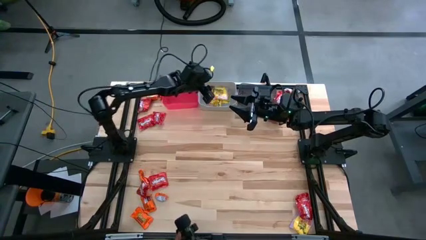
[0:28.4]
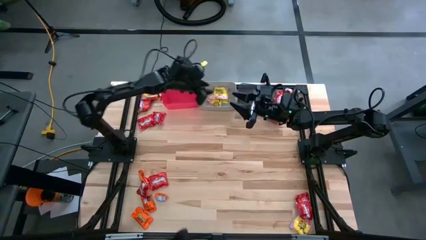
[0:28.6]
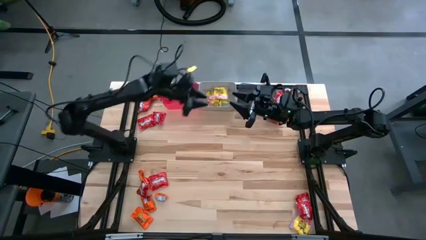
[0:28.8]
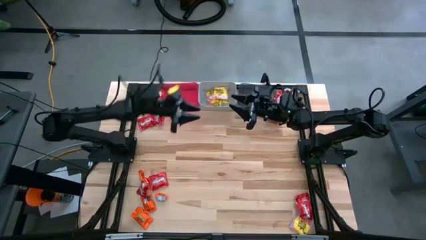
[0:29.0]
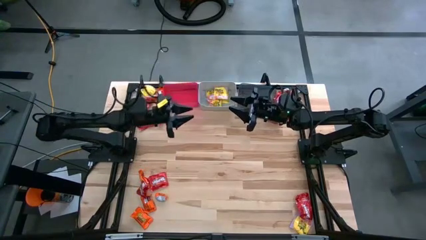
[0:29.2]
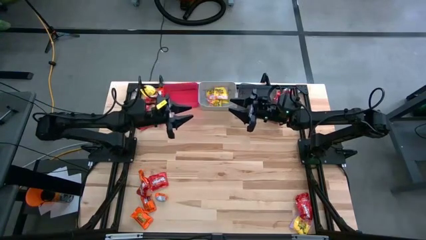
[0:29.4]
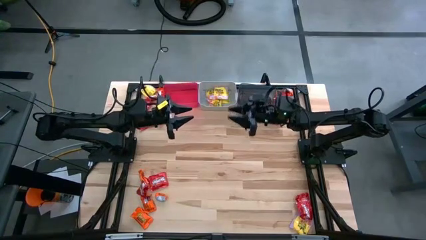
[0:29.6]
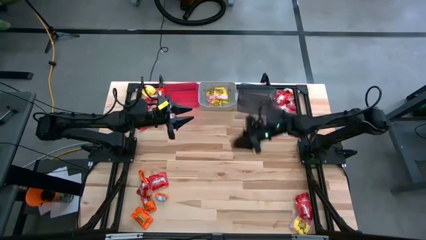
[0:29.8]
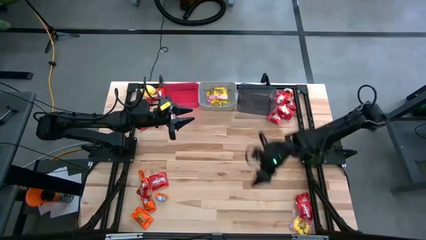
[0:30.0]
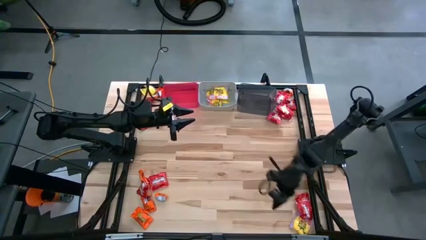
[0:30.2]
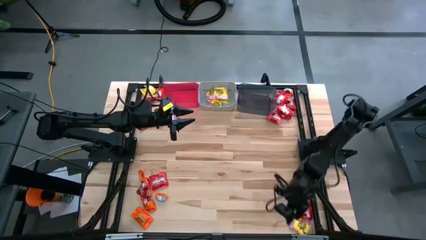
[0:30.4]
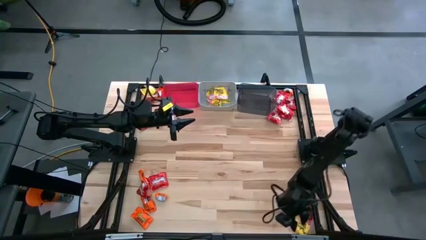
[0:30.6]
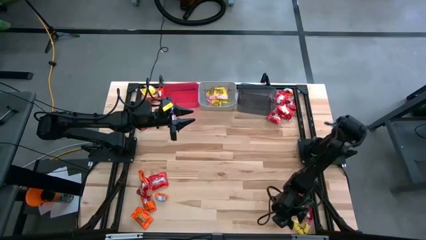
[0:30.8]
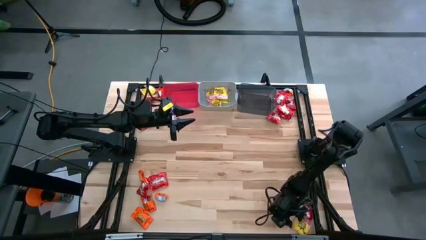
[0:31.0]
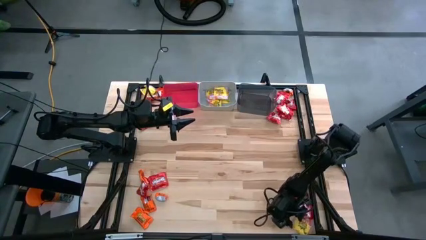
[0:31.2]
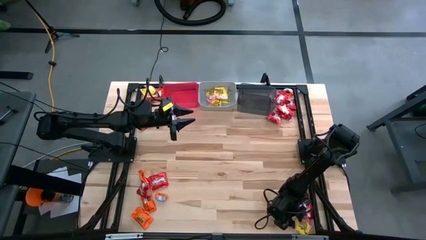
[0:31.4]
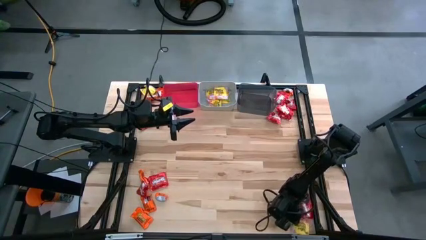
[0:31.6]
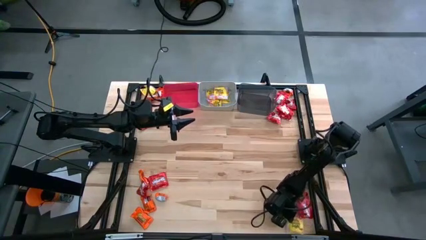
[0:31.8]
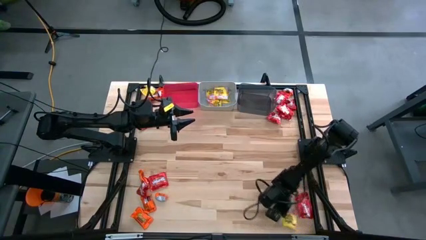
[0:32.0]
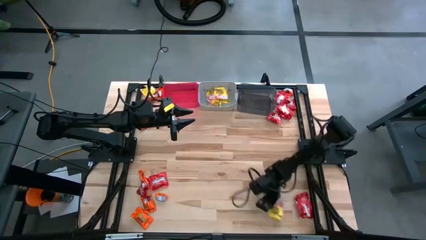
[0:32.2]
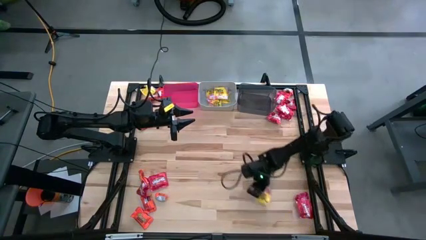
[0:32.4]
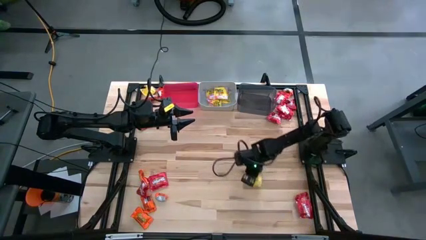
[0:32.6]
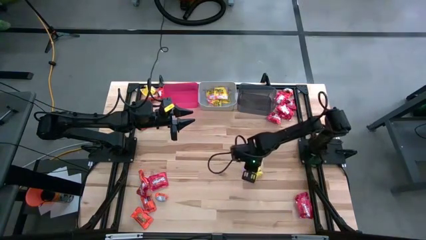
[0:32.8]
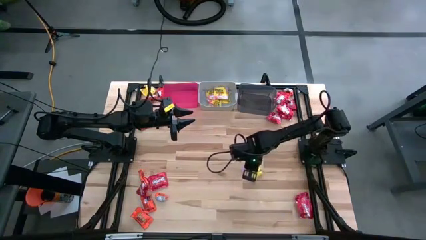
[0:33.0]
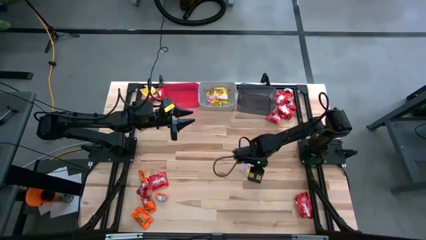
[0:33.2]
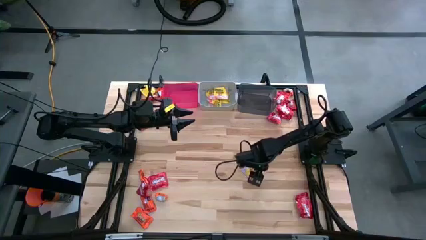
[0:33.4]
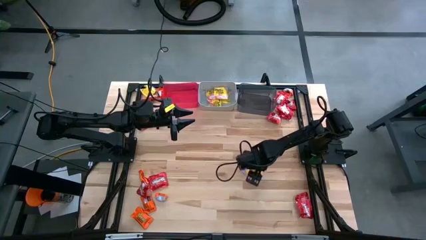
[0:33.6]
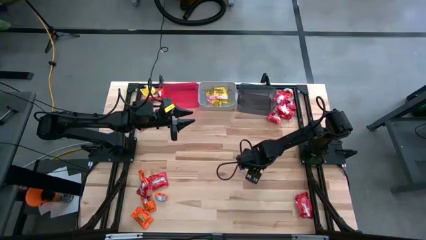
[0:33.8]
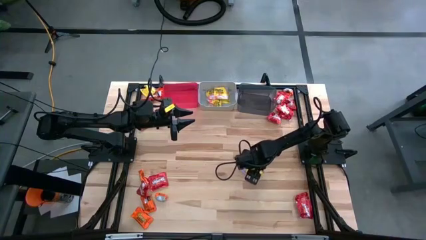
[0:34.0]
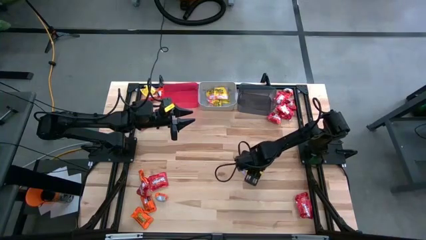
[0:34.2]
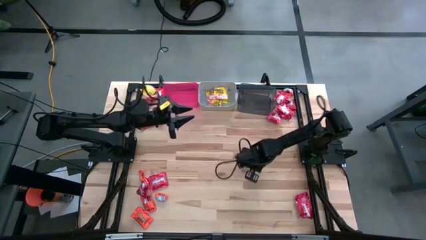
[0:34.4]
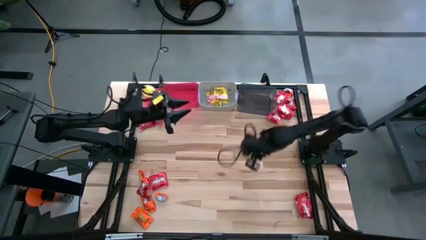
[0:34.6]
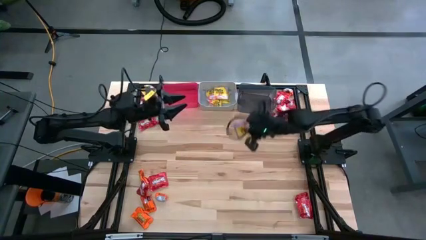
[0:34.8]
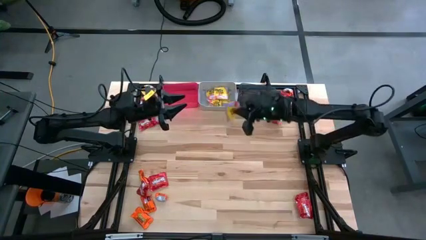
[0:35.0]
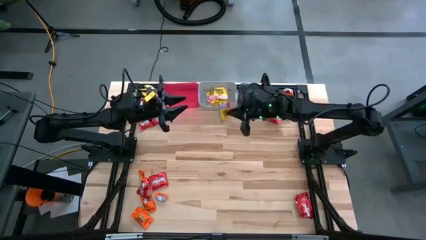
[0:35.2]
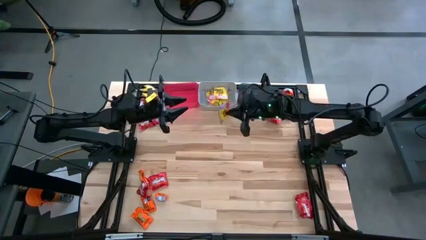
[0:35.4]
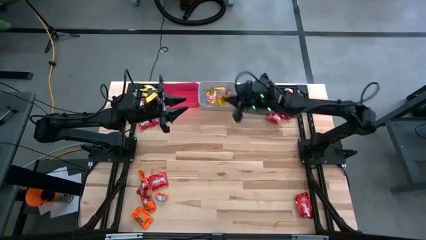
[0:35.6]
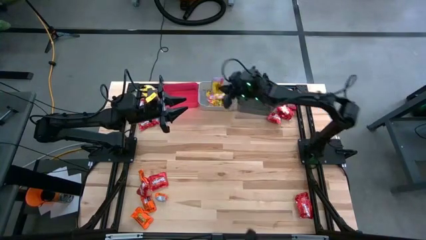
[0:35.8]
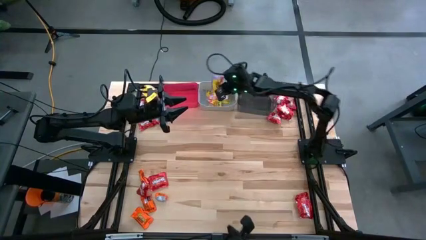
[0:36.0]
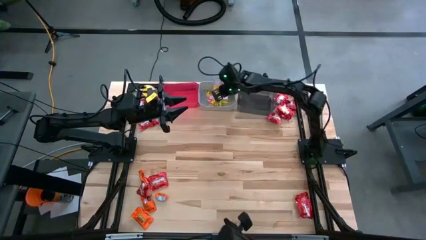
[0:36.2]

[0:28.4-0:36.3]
Task: Sort candy
Put the yellow candy into the gray bin

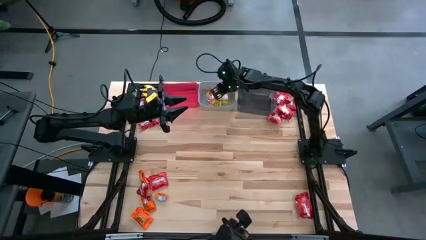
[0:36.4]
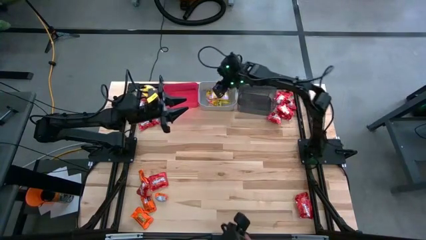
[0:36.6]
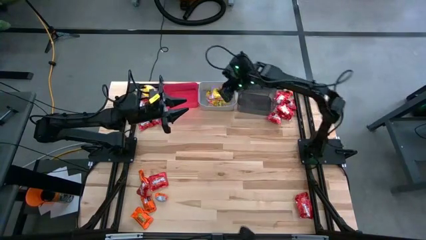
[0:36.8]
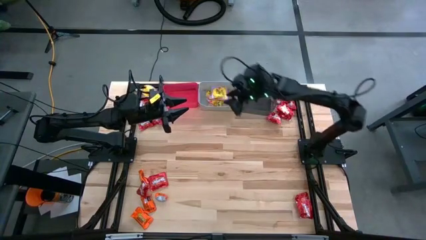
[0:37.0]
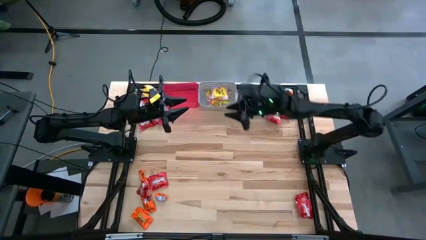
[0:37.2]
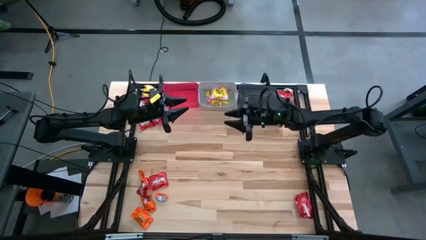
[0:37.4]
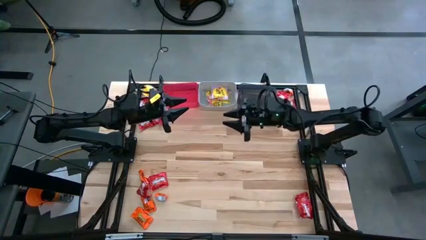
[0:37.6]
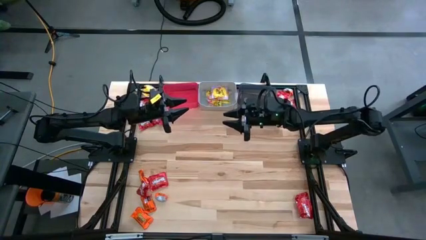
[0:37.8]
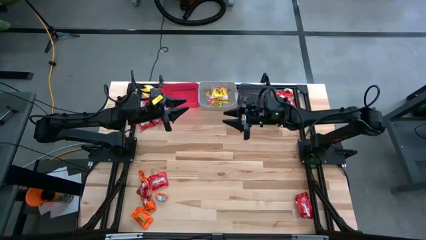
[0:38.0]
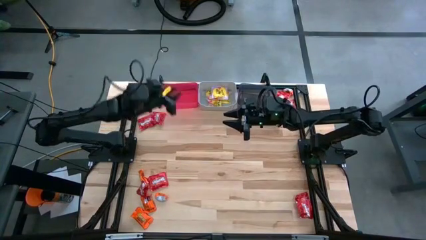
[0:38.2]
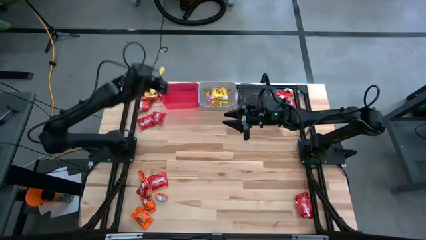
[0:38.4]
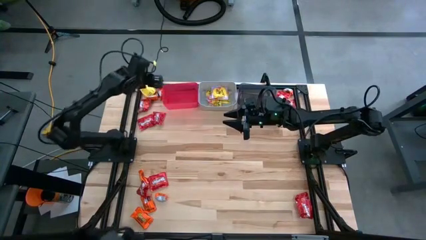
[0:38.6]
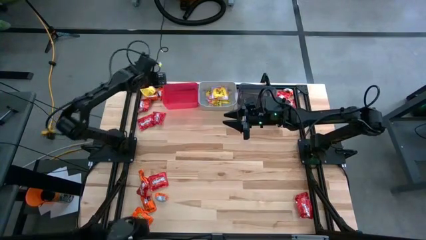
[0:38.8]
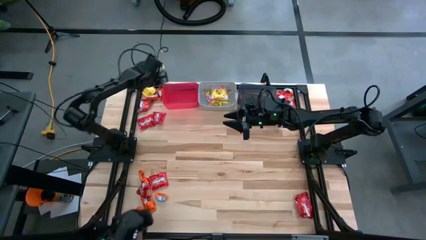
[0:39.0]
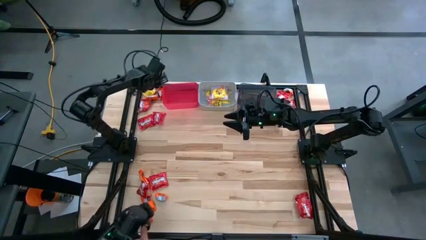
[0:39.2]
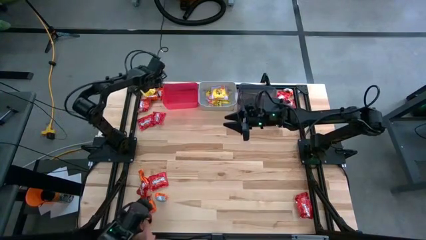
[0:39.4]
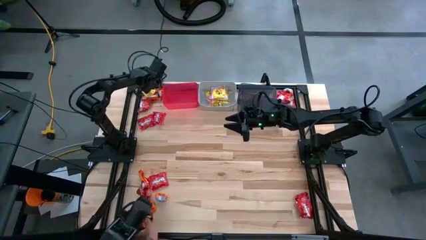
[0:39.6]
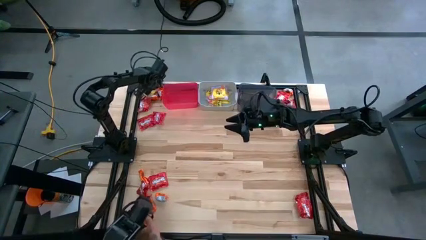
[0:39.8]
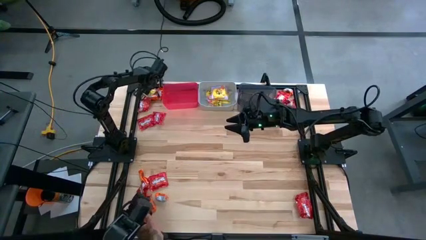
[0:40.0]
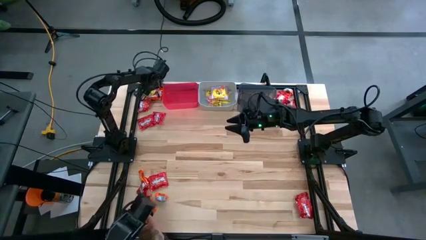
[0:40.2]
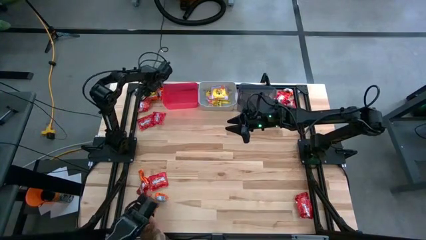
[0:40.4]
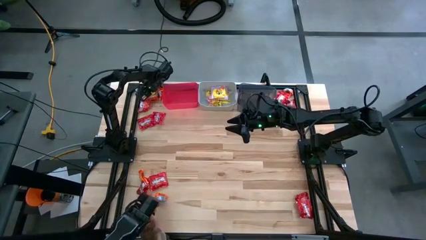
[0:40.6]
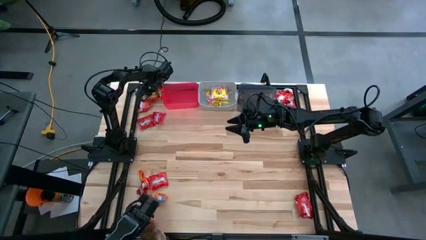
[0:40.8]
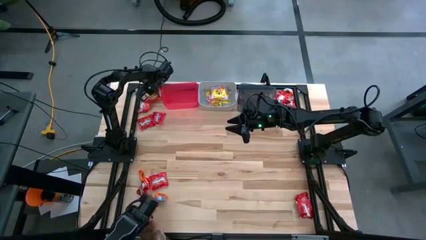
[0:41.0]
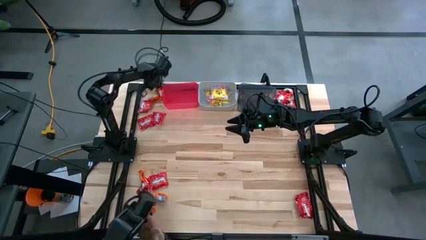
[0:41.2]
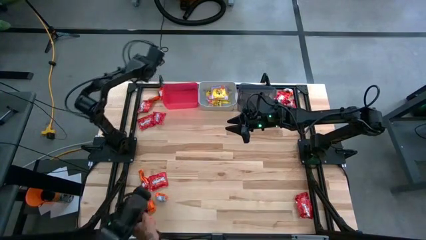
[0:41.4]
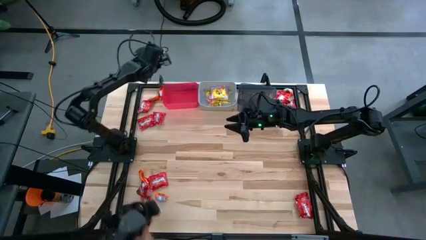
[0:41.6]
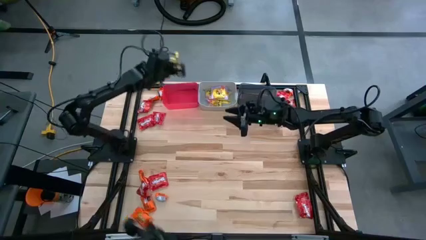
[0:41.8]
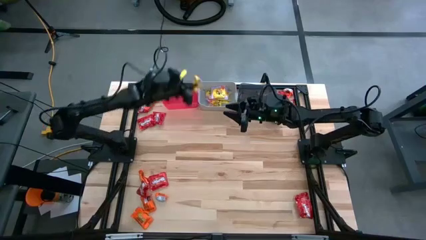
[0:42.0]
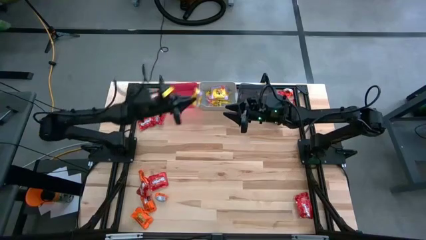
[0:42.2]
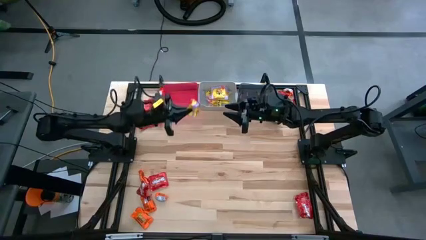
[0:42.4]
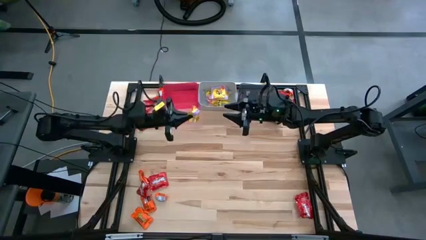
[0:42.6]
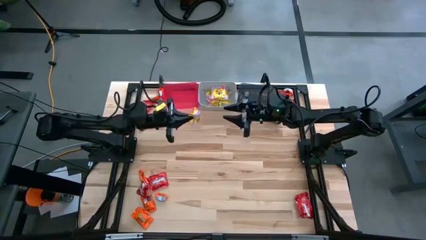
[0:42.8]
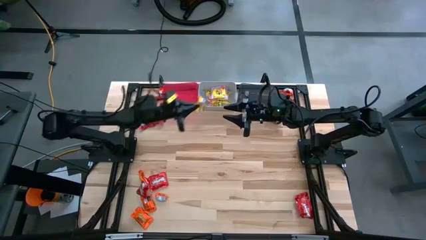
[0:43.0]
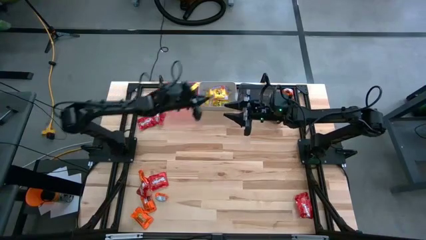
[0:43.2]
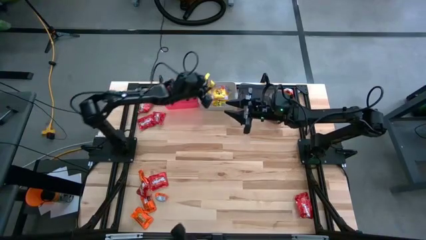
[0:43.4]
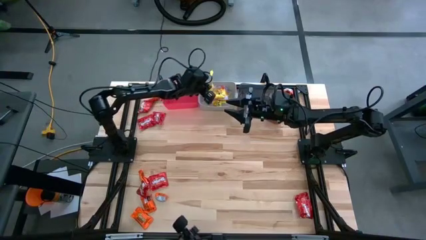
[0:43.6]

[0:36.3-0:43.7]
Put the yellow candy into the gray bin

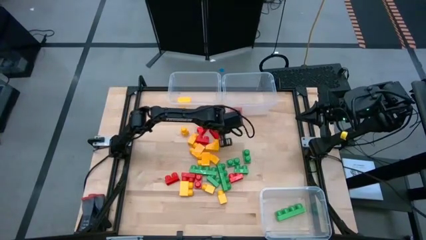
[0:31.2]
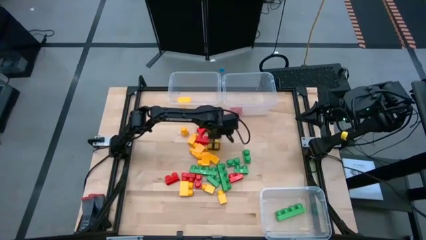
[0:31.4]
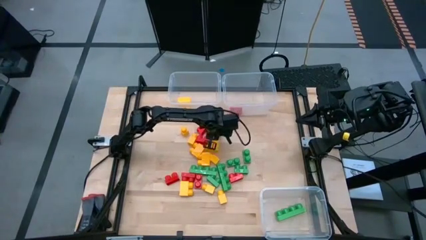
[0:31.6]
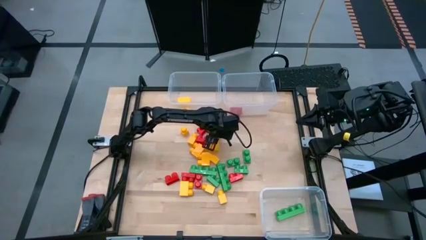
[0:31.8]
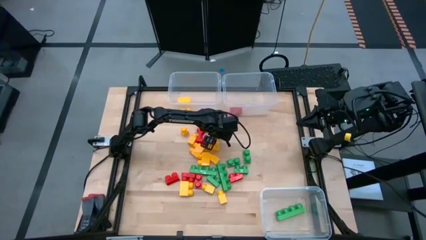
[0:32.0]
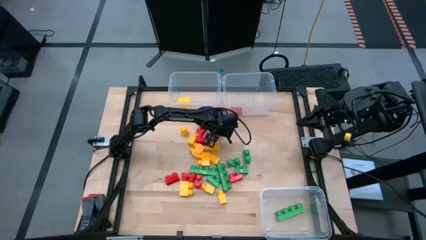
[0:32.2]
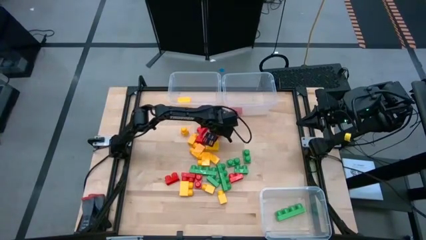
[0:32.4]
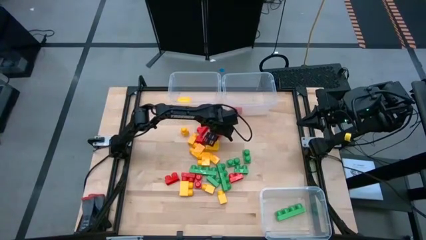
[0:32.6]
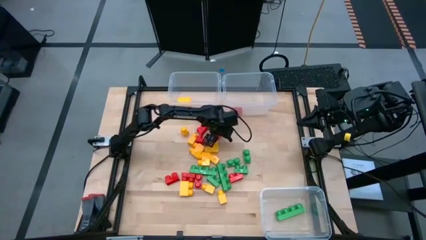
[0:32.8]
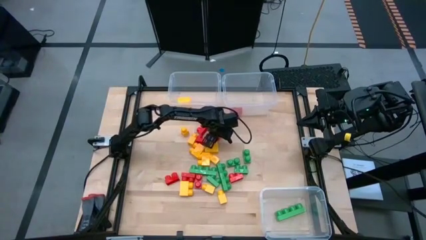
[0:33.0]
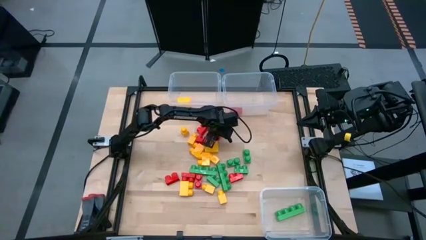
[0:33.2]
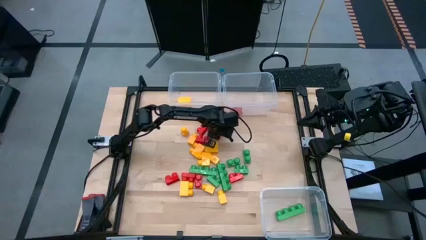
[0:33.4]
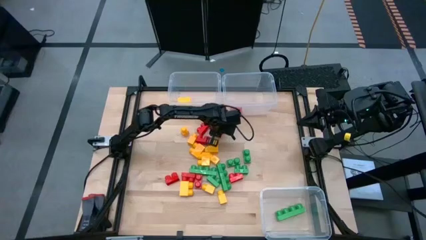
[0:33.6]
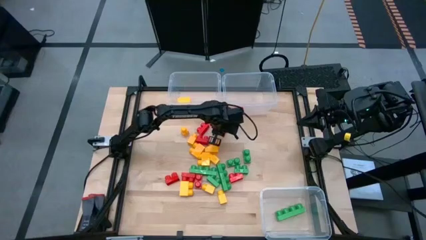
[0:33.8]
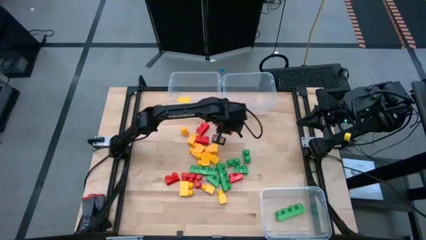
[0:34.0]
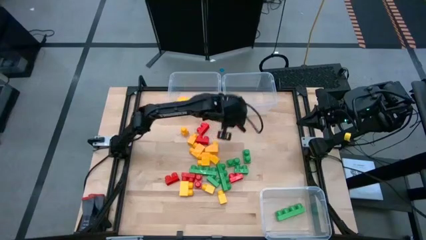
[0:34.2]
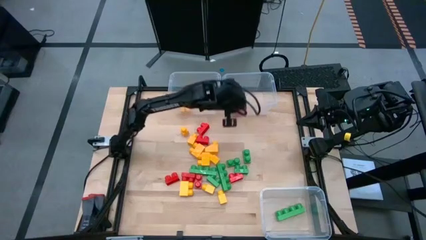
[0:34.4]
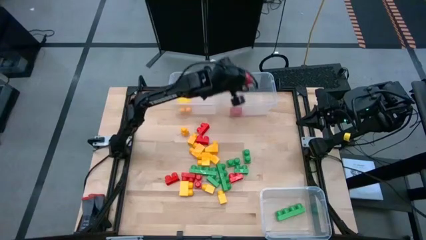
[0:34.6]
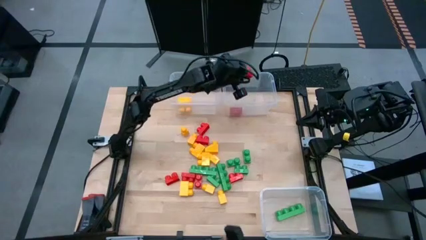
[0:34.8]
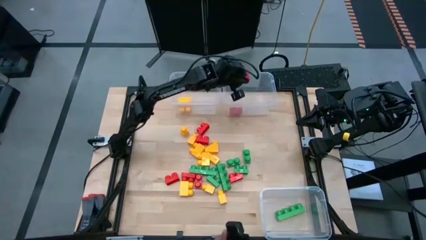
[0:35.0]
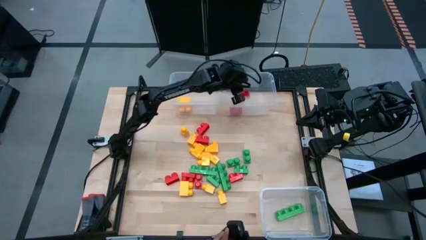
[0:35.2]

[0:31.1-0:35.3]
Task: Sort blocks
Put the red game piece into the top right transparent bin
